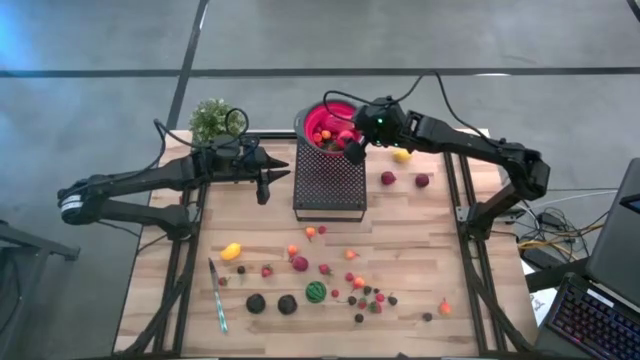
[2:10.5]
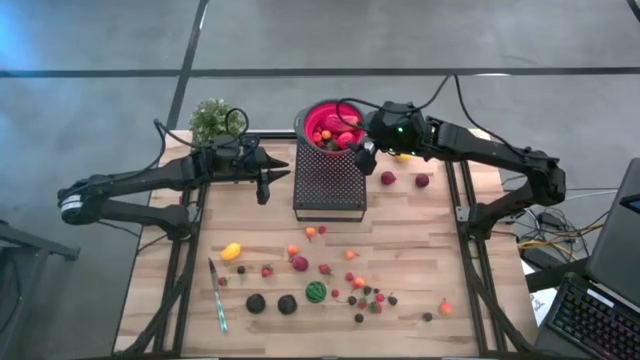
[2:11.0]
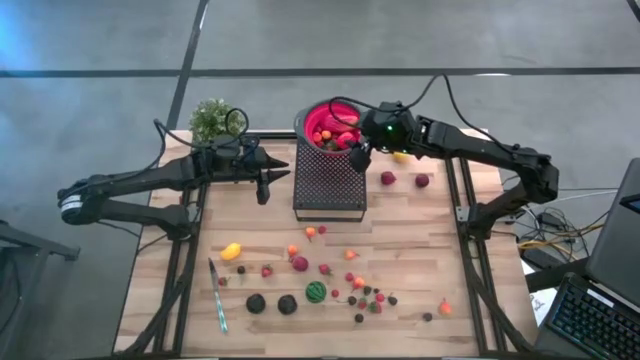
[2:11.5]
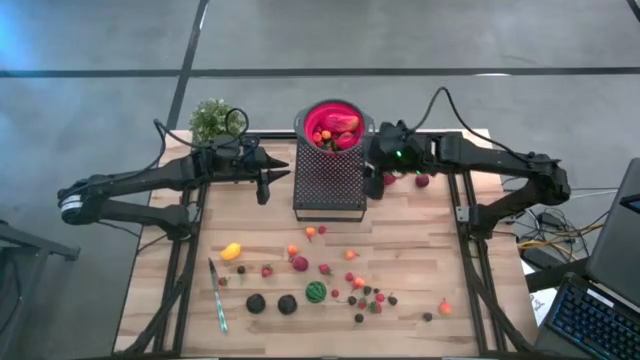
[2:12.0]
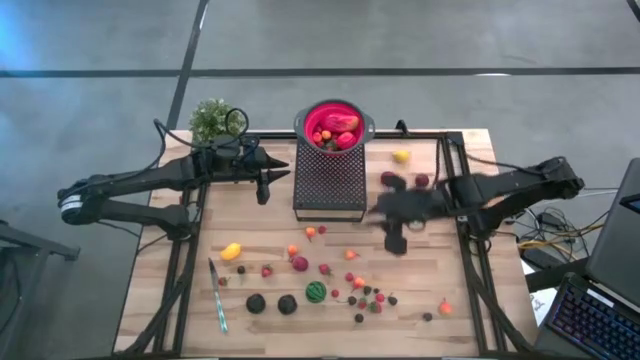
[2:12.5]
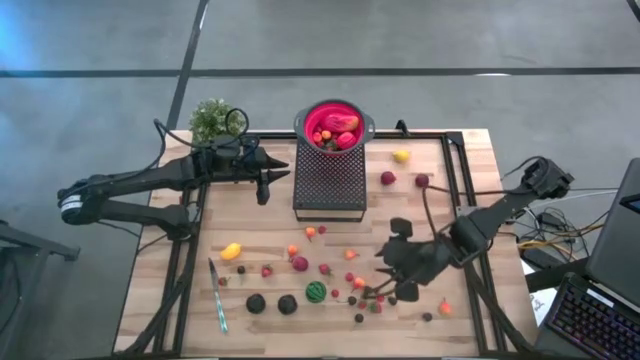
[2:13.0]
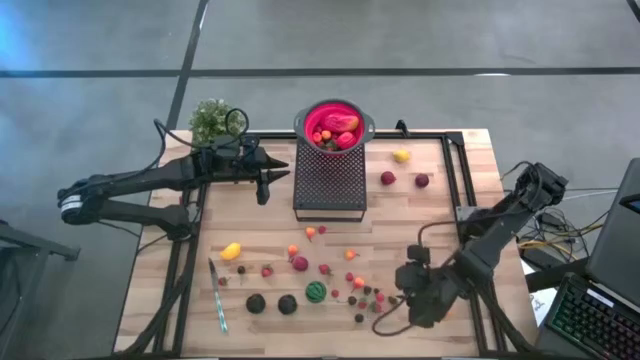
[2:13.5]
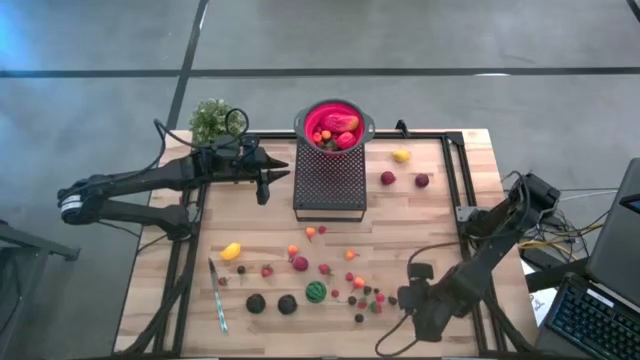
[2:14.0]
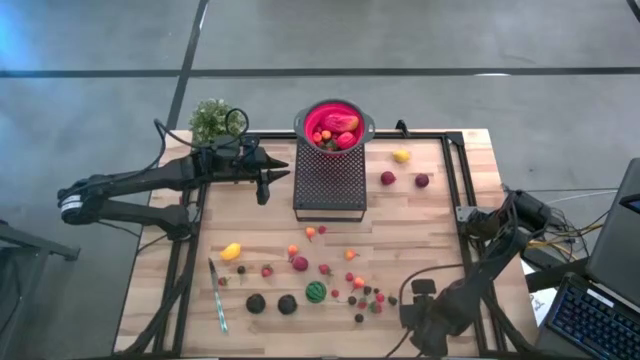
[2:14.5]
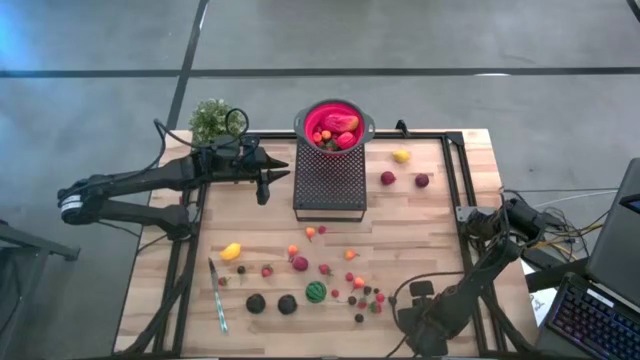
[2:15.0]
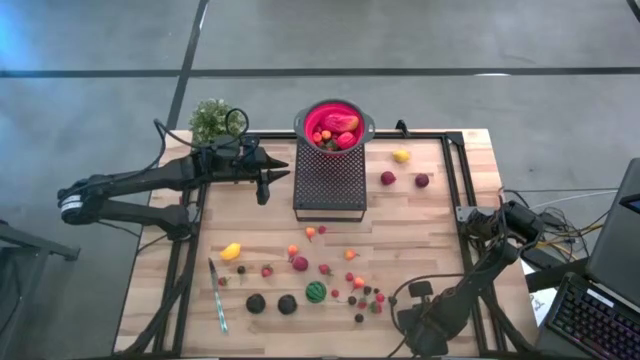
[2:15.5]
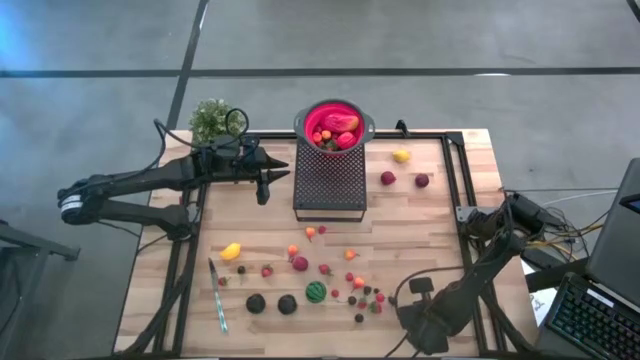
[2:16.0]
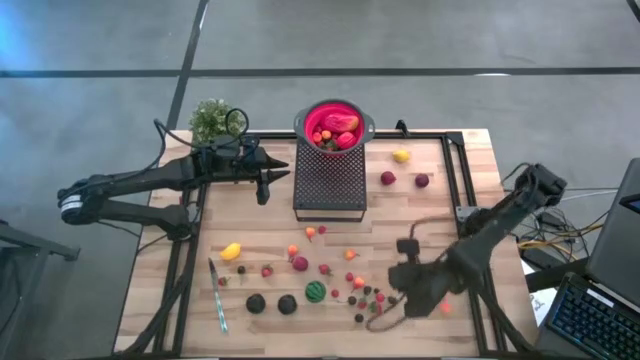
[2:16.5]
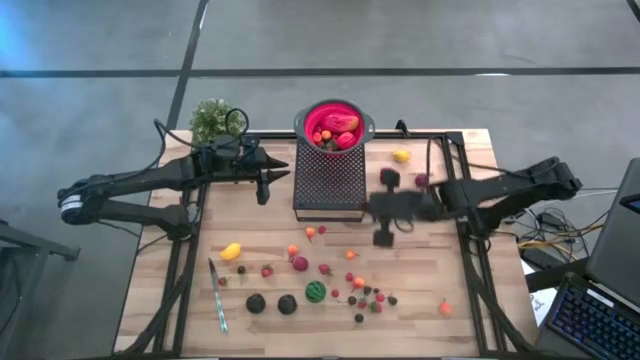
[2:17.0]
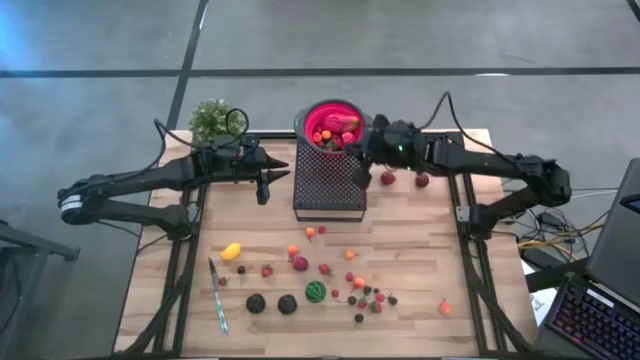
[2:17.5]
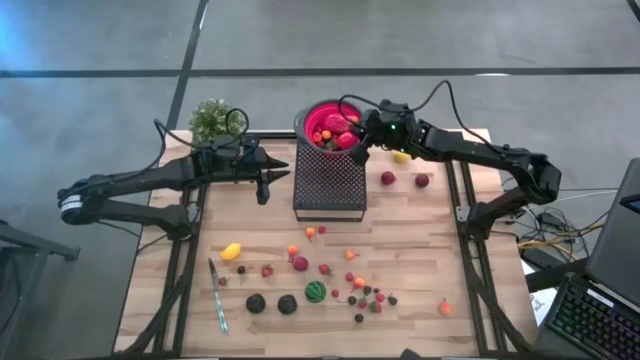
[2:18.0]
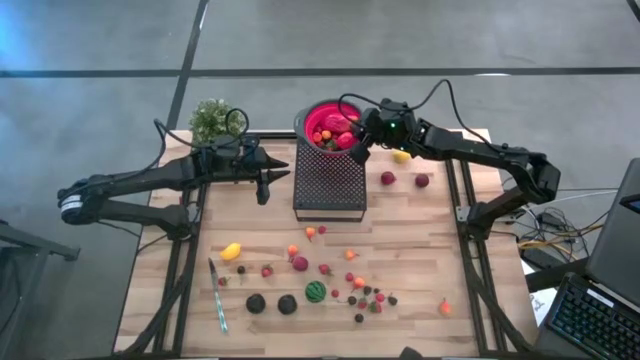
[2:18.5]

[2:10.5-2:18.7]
Task: Pick & Place Fruit
Put the black cherry into the red strainer bowl on the shelf

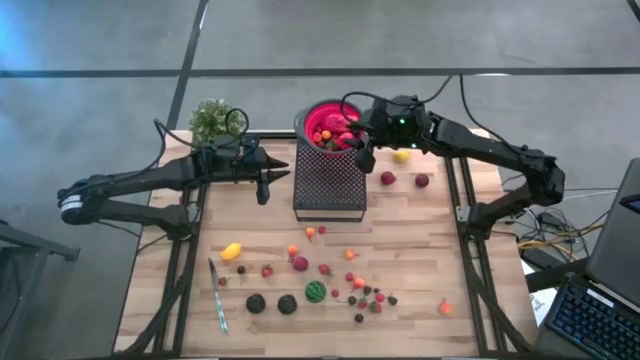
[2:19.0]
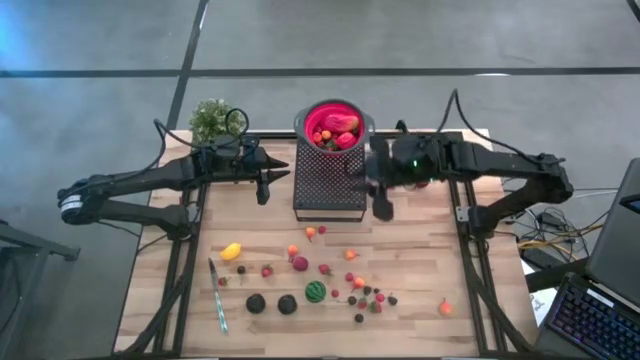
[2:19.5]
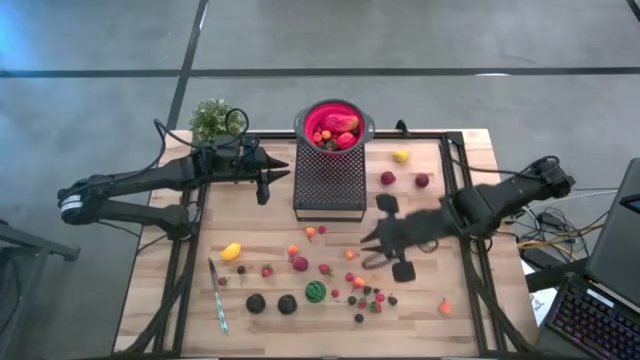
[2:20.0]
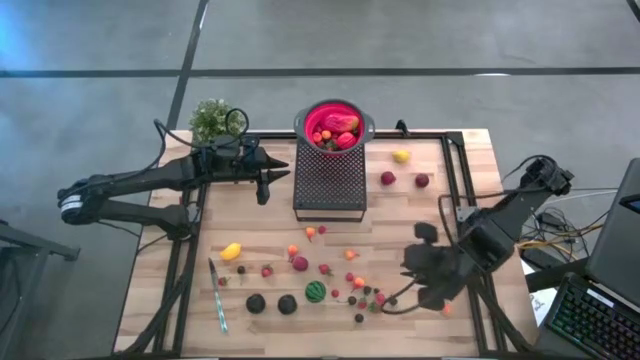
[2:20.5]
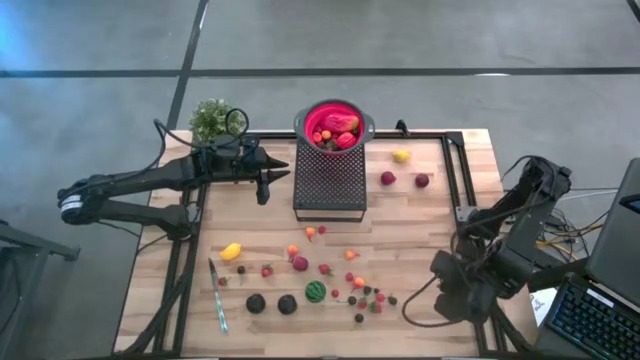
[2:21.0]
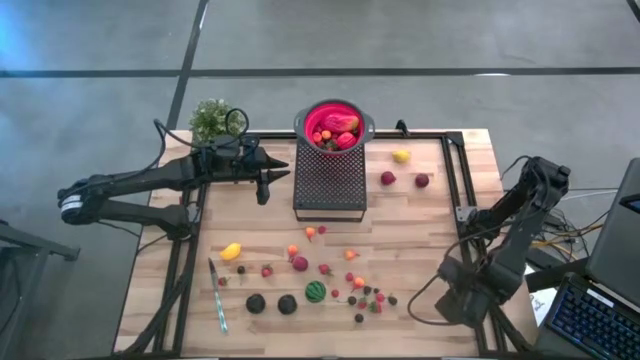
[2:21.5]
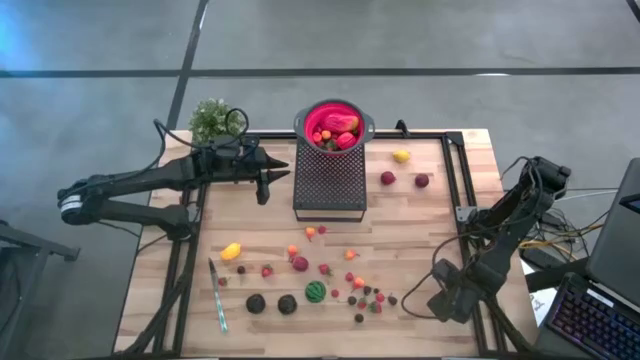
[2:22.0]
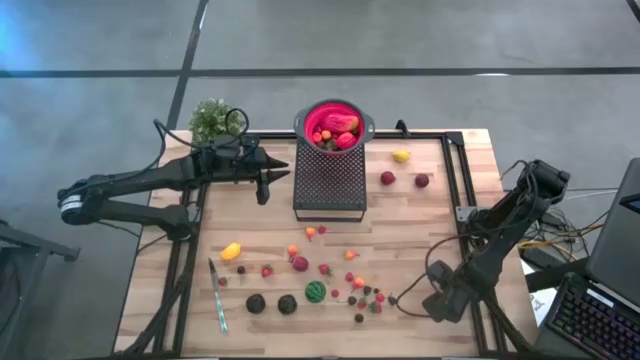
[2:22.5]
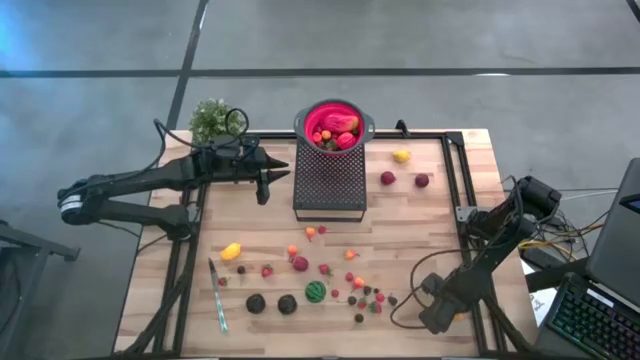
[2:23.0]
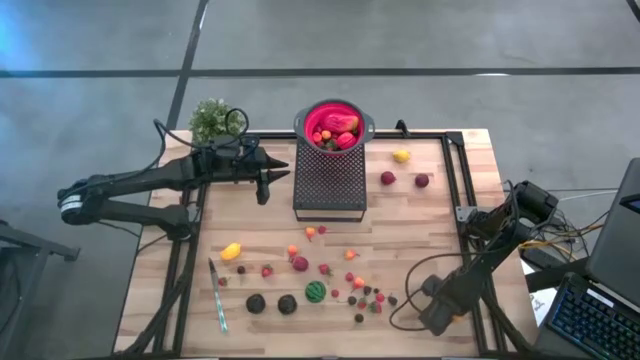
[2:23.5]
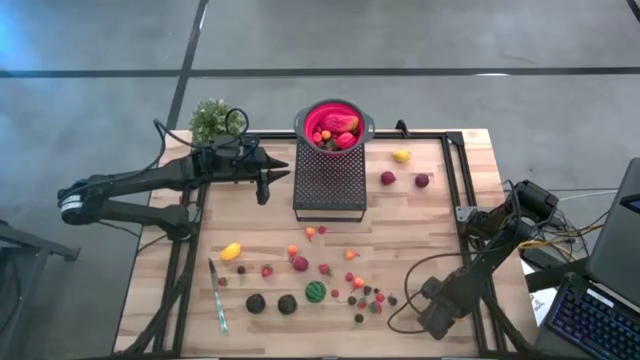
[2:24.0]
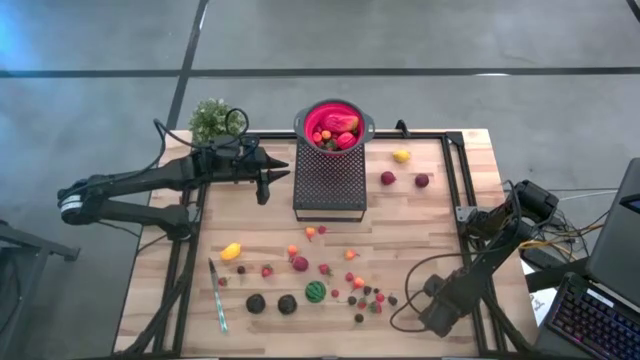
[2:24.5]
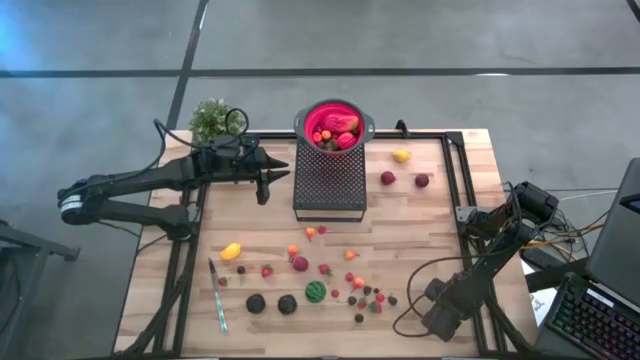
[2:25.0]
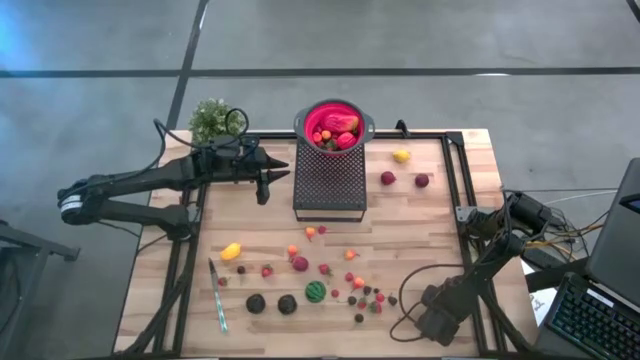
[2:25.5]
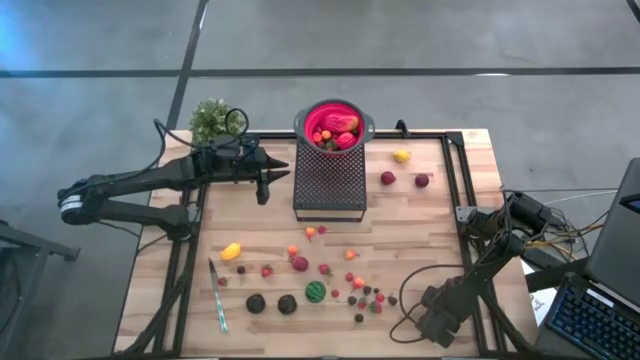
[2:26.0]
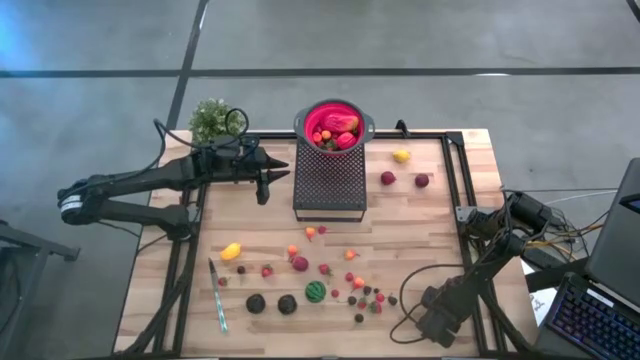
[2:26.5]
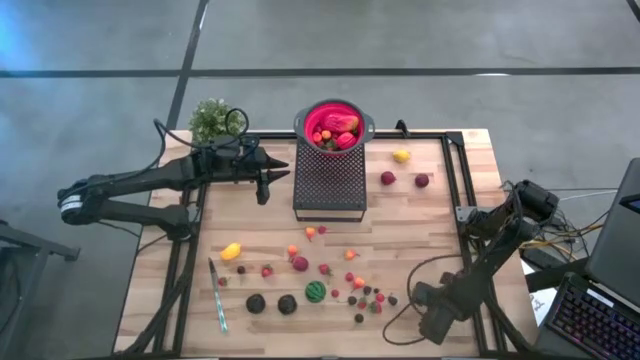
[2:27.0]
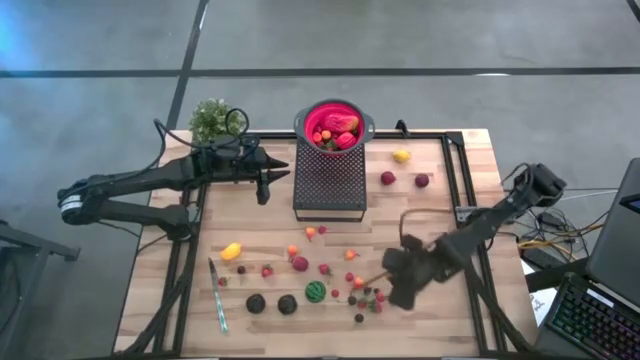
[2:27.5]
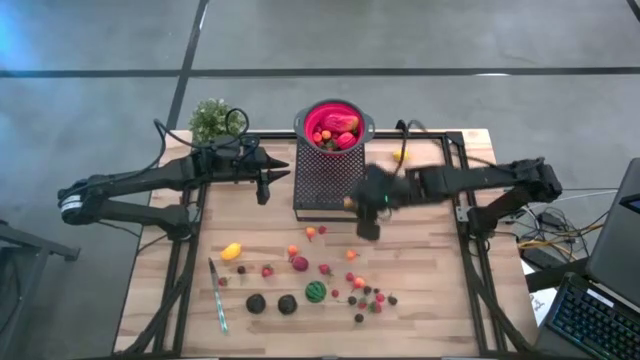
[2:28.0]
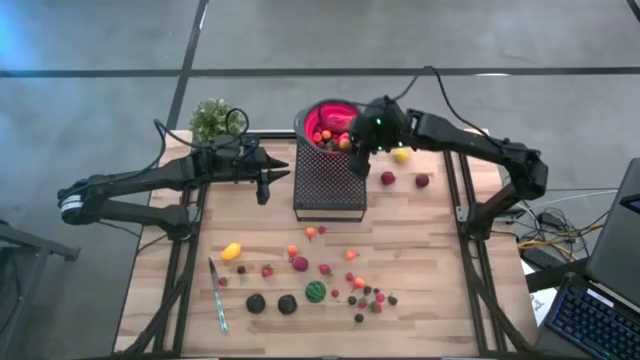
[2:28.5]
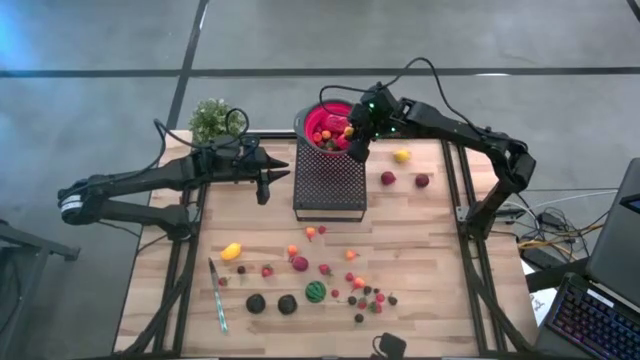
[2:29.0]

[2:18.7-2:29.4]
Put the pear into the red strainer bowl on the shelf

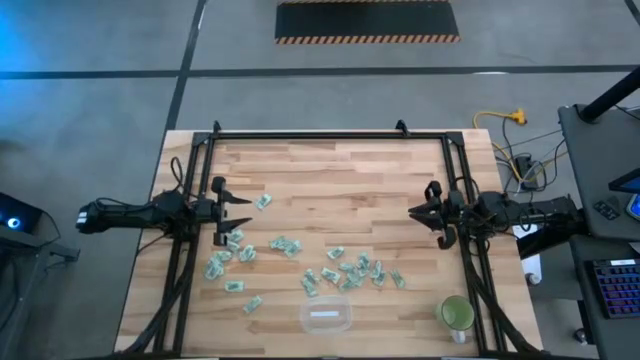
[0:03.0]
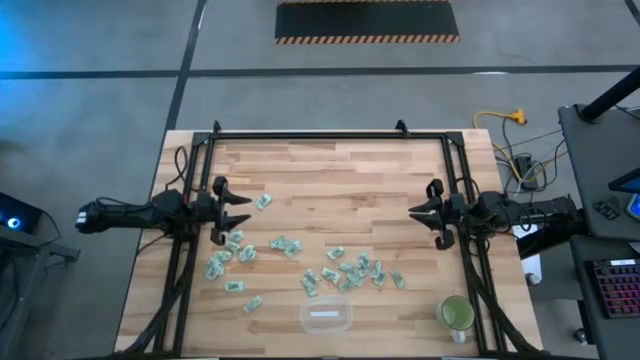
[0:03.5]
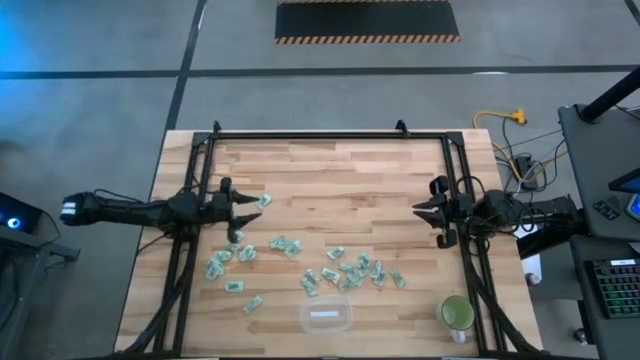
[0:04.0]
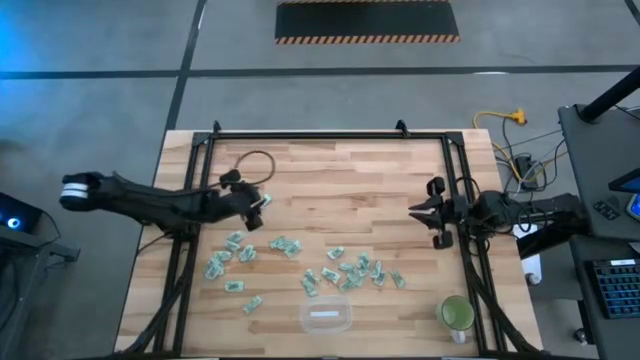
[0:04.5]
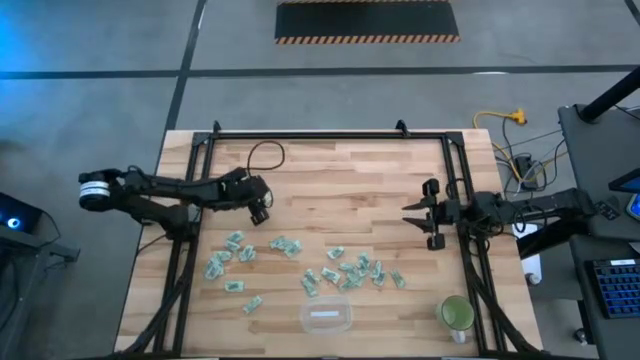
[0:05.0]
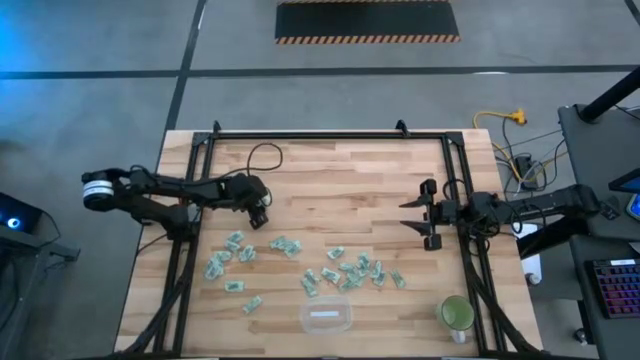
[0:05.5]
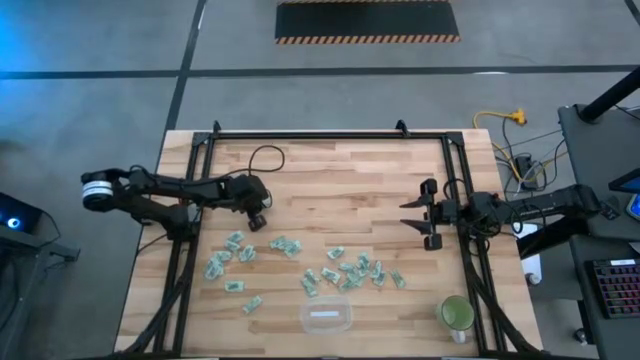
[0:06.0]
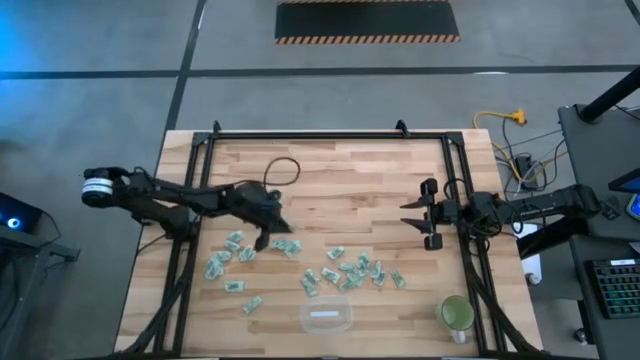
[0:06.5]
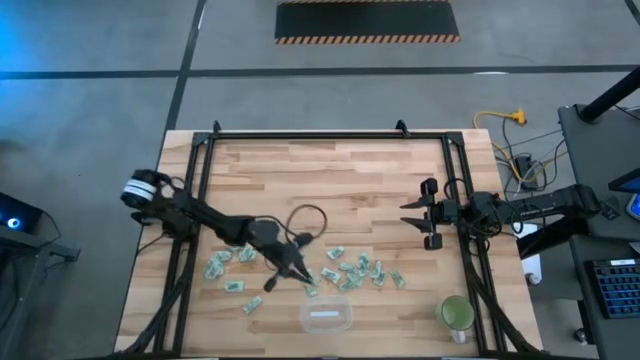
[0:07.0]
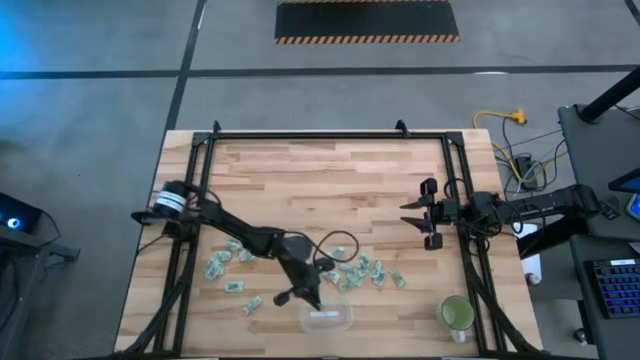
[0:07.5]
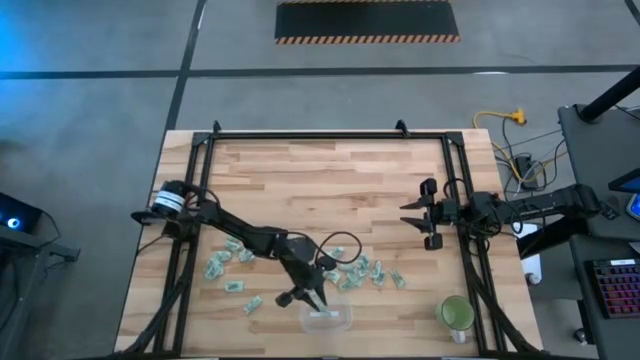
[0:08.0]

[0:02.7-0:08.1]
Task: Pick and place Stevia / Truvia into bins
Put the stevia packet into the transparent container
